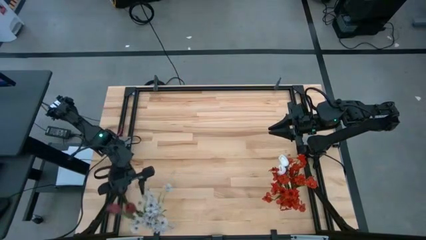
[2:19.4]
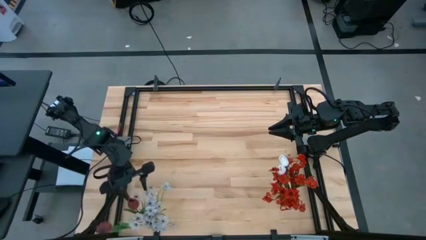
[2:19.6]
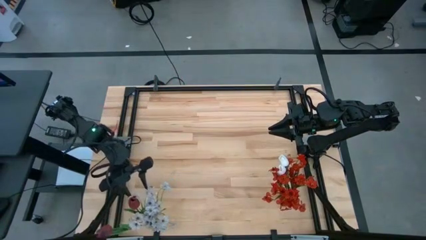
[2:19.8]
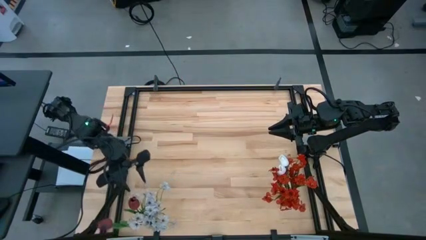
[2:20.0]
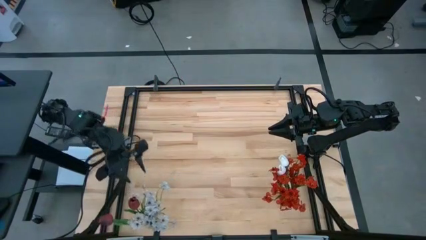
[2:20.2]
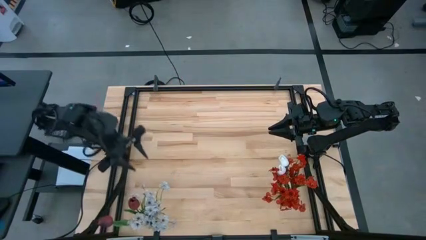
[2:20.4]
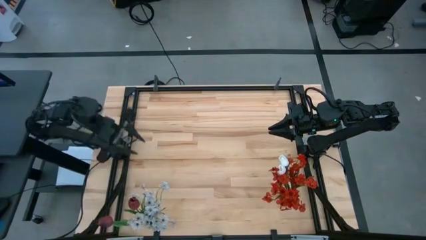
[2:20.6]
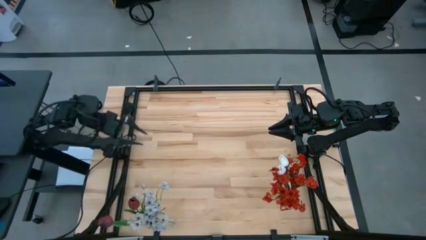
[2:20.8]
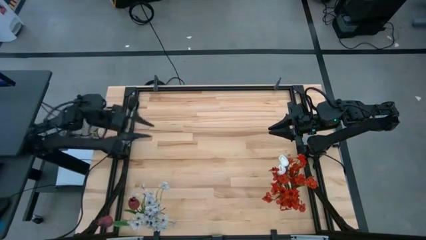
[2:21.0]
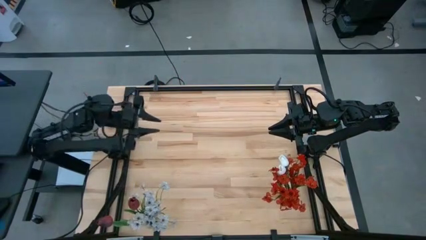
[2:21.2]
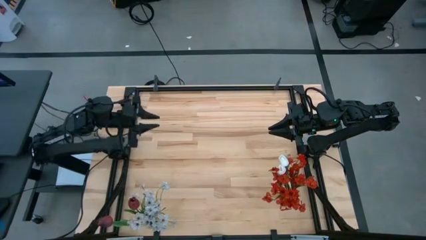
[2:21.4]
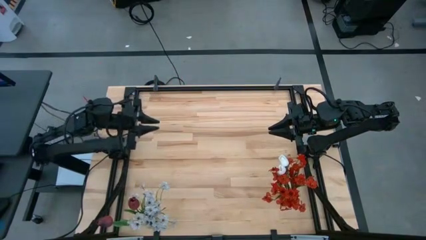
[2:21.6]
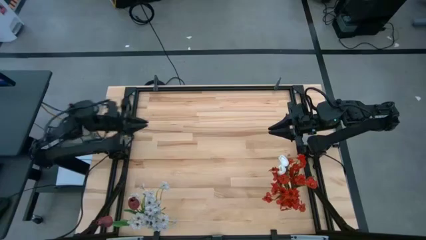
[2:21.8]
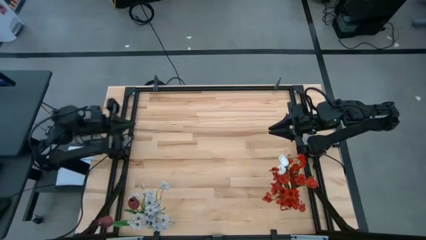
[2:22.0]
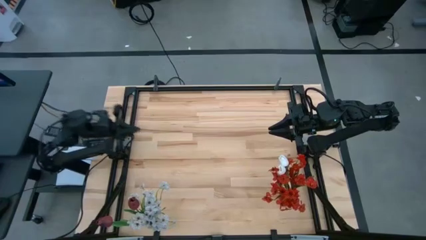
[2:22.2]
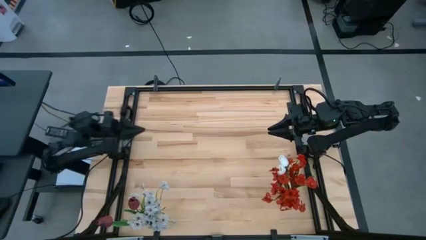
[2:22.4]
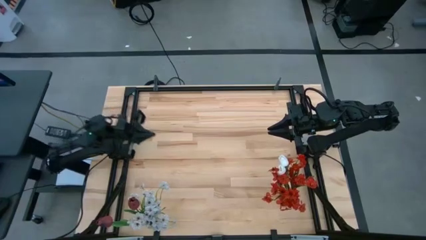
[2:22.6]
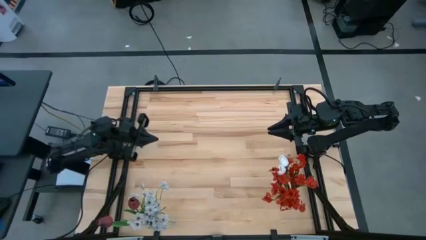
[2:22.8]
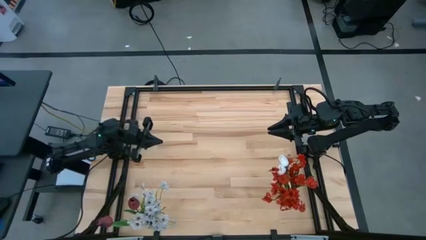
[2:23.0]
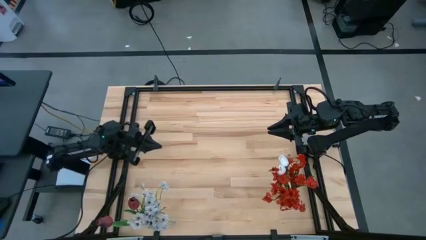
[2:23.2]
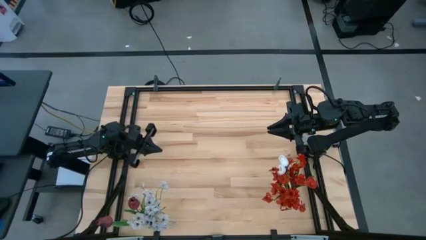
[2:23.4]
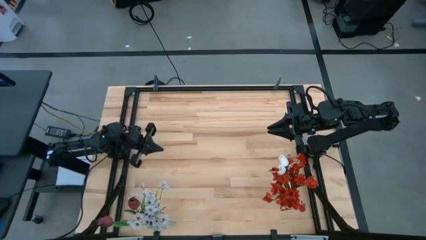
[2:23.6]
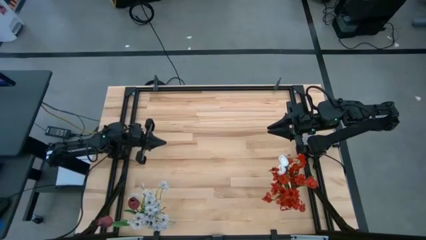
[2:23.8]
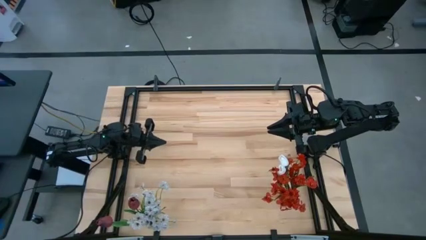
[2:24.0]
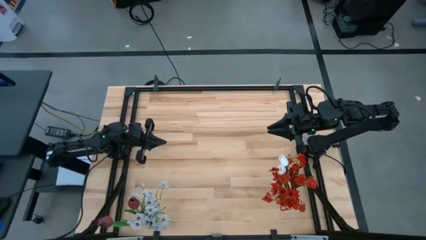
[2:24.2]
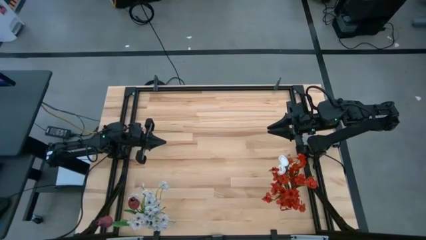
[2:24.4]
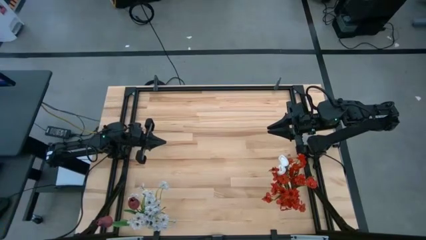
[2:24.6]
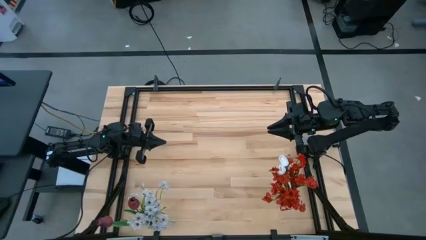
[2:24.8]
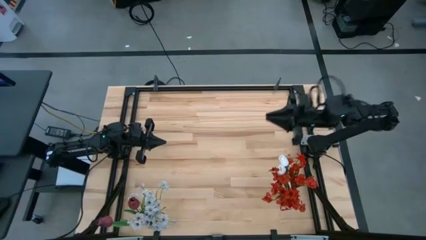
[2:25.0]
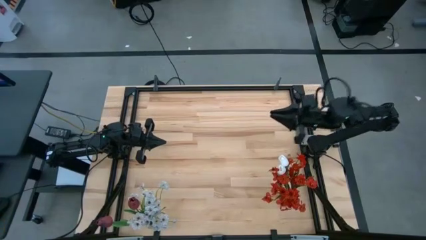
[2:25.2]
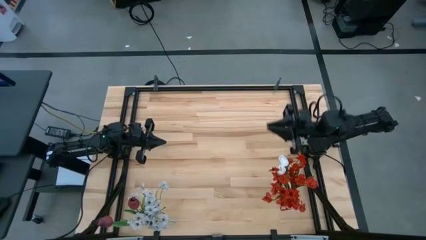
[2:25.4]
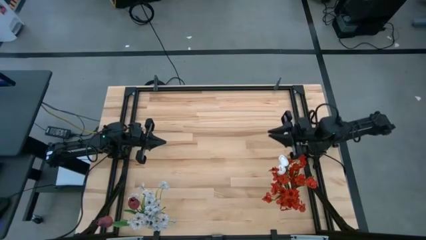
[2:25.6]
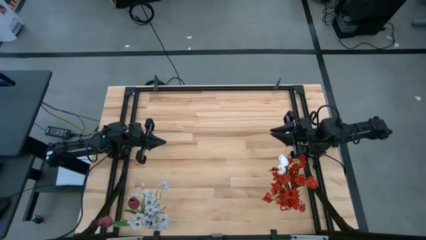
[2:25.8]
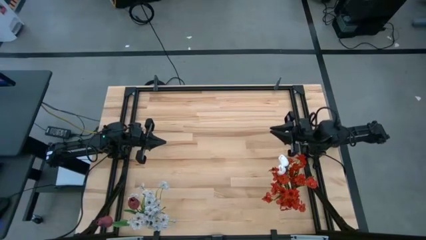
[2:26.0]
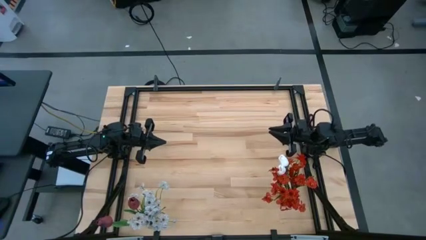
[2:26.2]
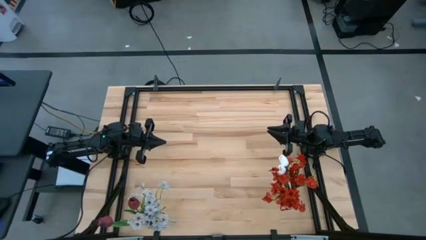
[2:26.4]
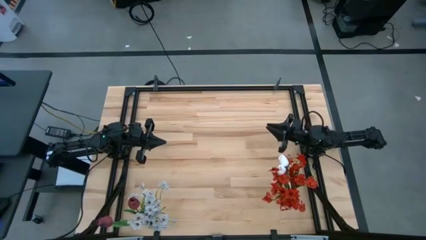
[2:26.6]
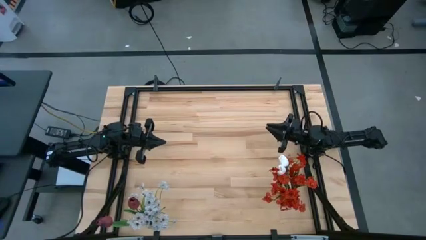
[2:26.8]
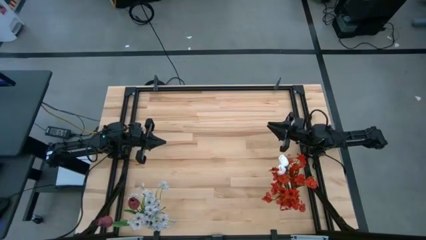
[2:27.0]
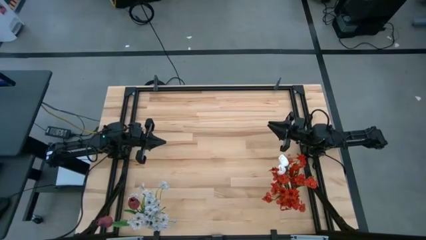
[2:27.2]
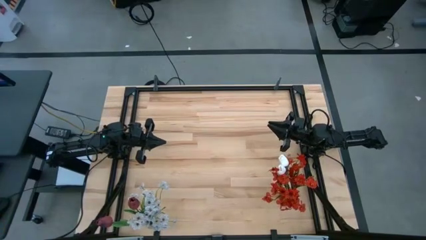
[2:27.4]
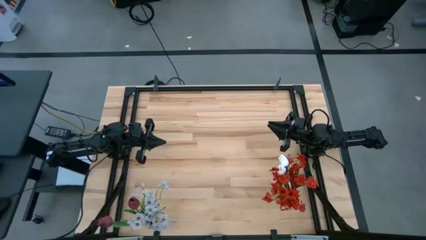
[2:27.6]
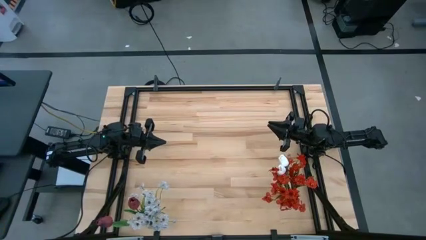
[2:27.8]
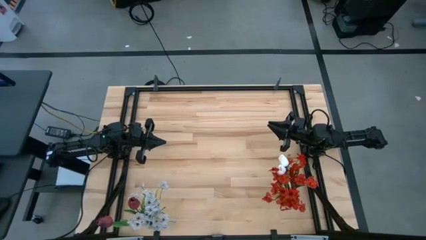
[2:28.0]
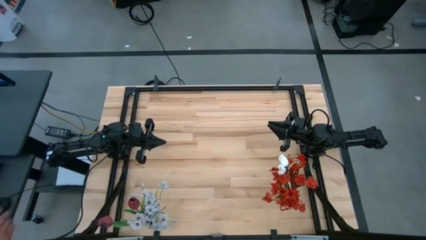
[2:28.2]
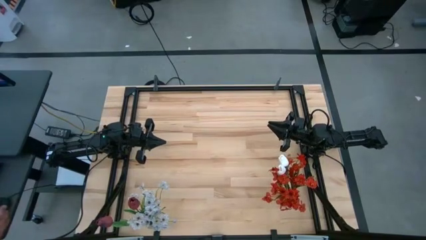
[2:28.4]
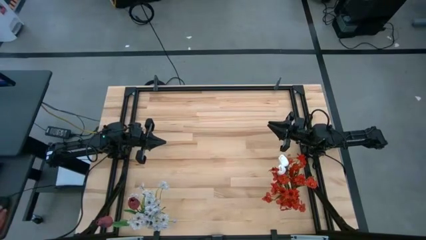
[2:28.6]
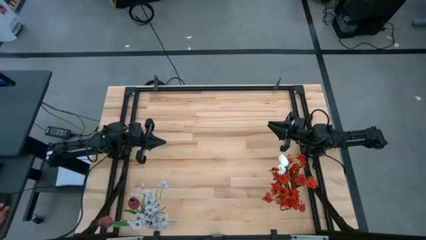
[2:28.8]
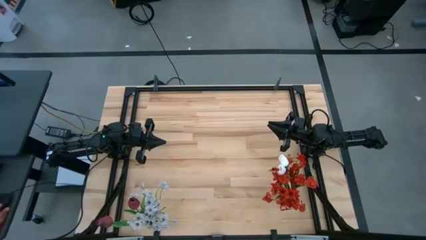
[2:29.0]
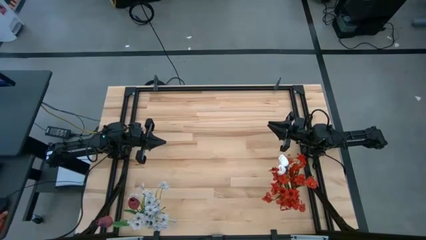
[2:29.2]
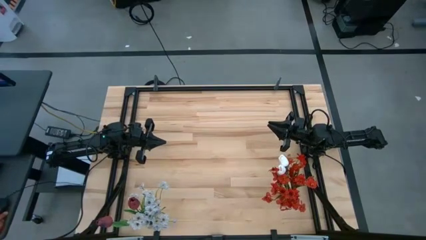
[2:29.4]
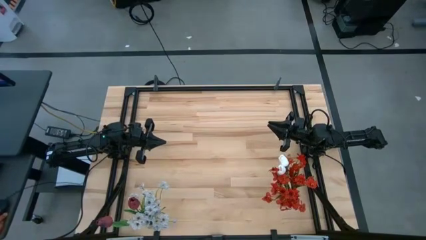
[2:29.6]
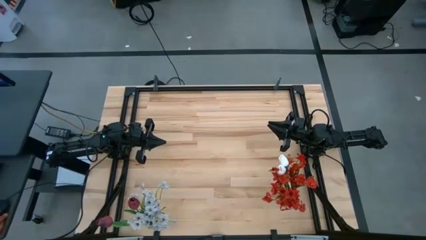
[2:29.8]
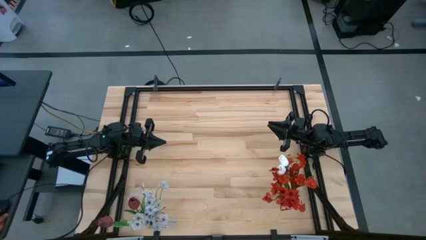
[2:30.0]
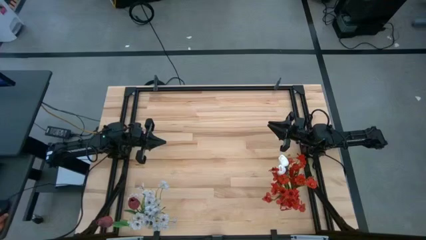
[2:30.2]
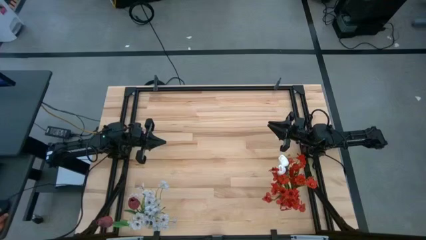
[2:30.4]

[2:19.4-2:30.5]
Task: Sort flowers into vase by color
Return to Home Position

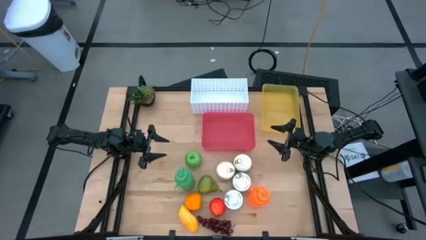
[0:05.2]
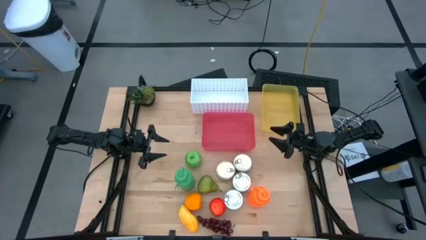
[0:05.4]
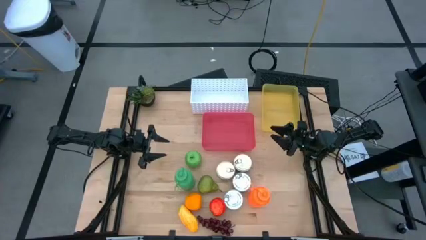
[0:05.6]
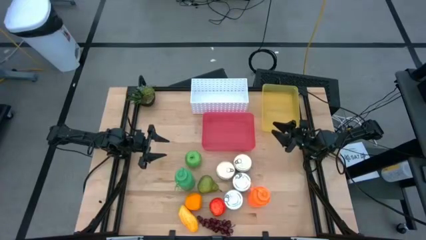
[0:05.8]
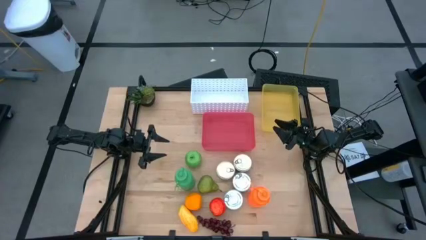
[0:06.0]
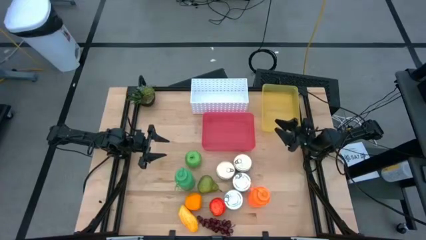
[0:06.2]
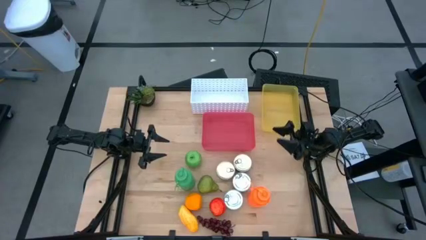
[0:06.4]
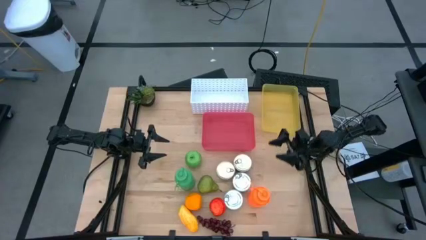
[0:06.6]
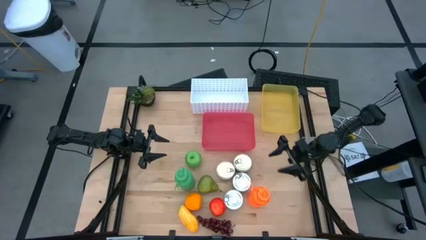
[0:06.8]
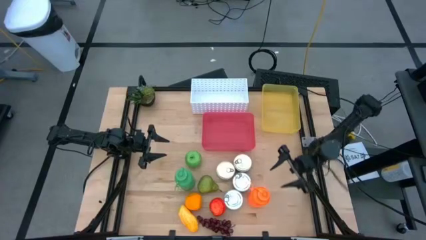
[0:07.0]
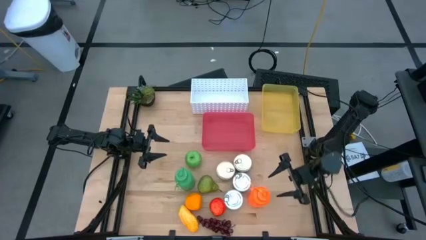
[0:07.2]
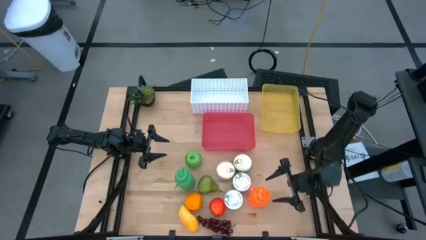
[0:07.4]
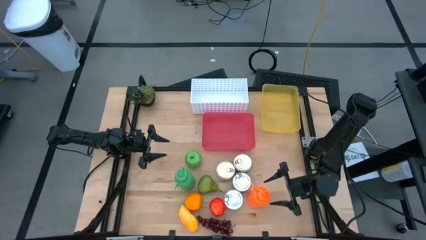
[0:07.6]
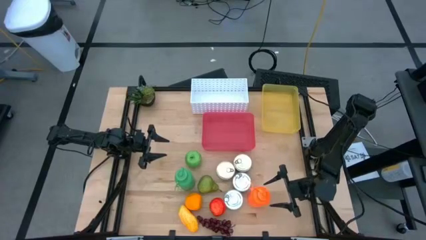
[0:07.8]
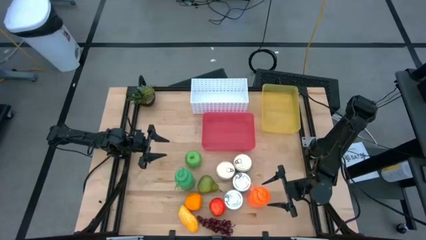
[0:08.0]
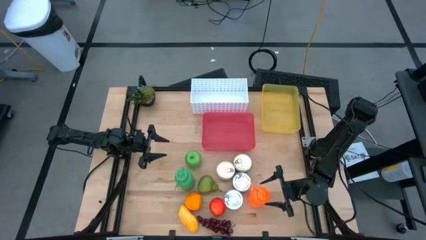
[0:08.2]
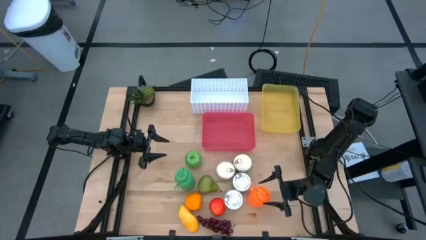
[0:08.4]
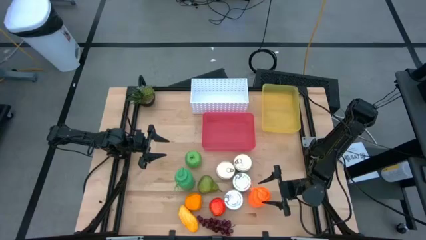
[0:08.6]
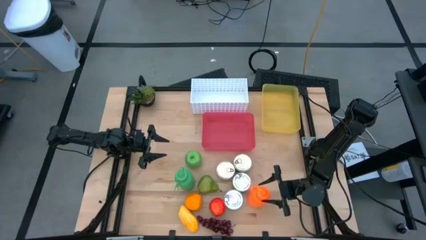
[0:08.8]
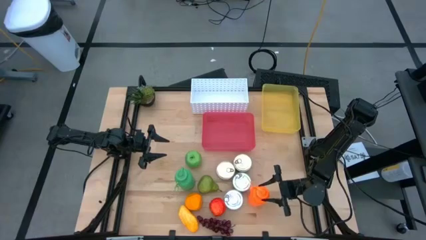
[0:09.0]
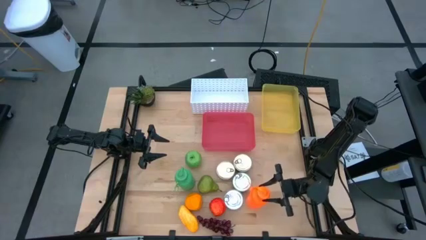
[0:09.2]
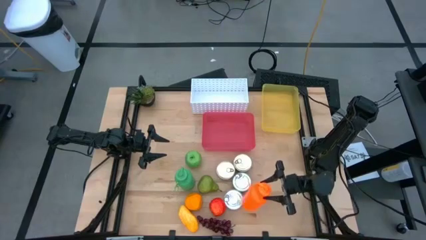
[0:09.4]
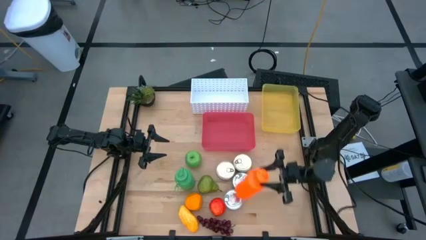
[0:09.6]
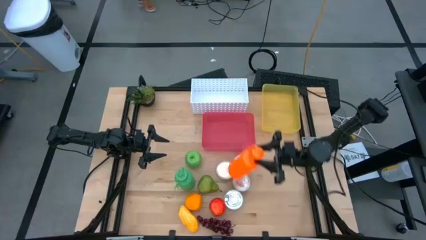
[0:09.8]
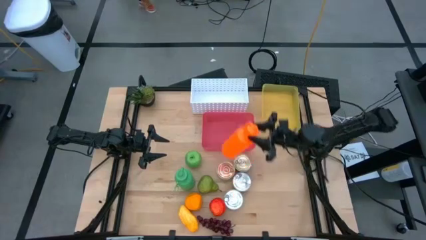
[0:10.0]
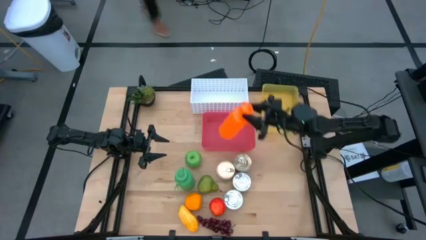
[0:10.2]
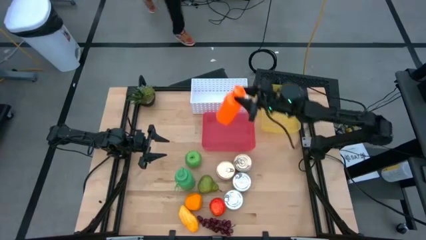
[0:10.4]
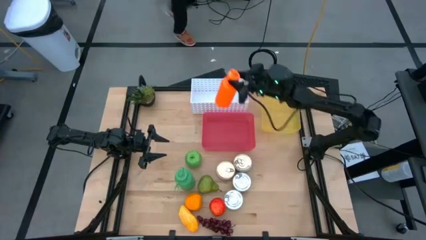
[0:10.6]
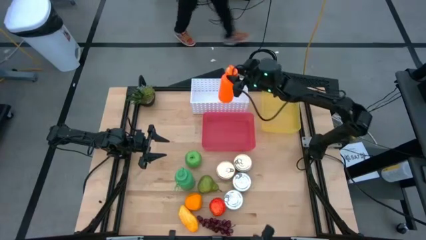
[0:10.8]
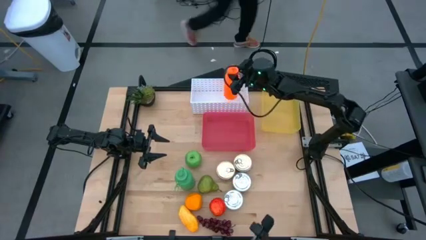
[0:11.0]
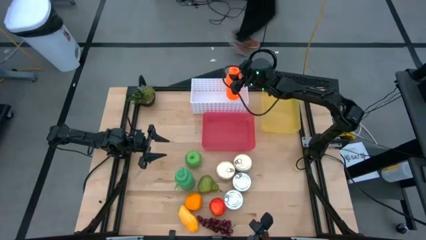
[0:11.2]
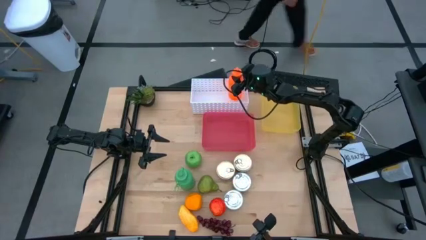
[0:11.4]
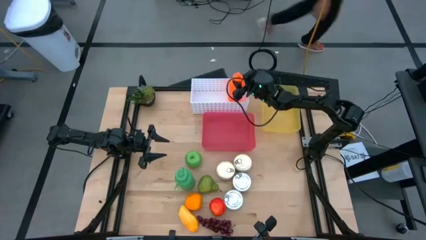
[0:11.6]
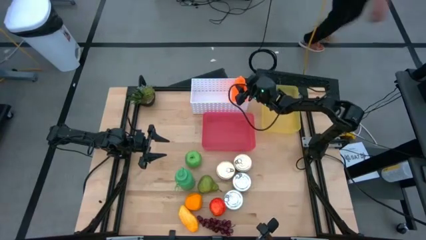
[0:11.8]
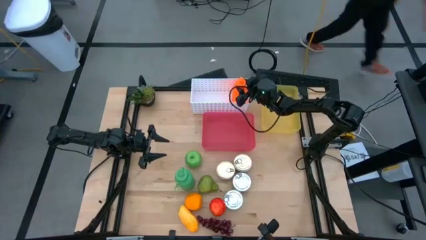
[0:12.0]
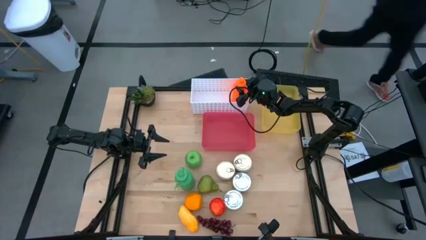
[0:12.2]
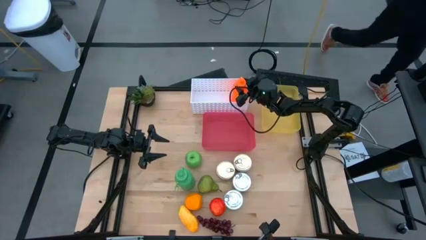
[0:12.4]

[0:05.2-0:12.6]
Task: Pick & Place Food Item
Put the orange tumbler into the white bin
